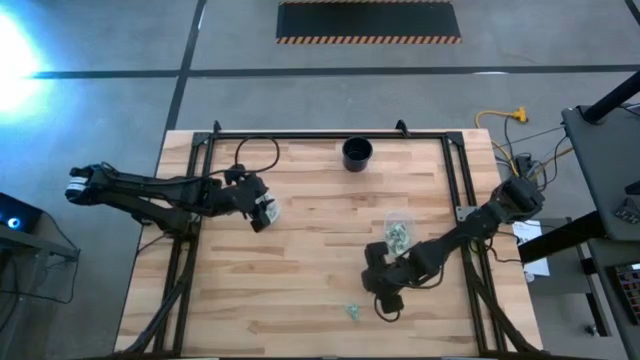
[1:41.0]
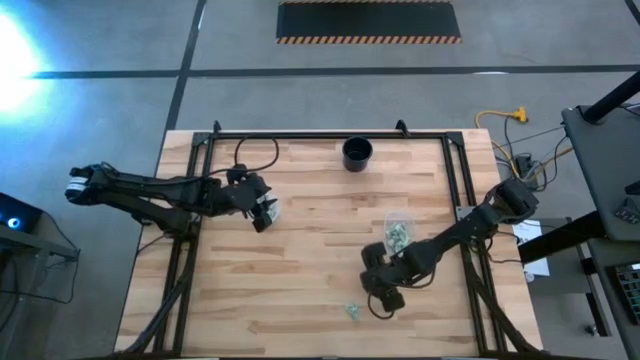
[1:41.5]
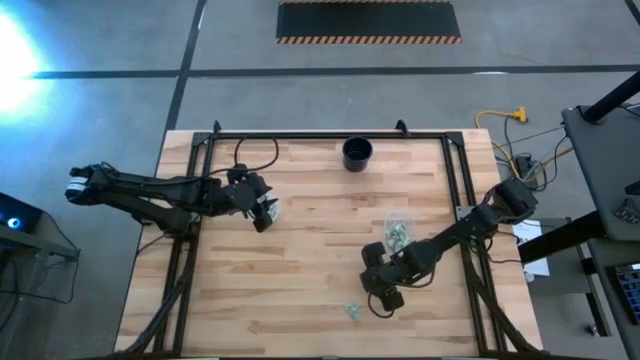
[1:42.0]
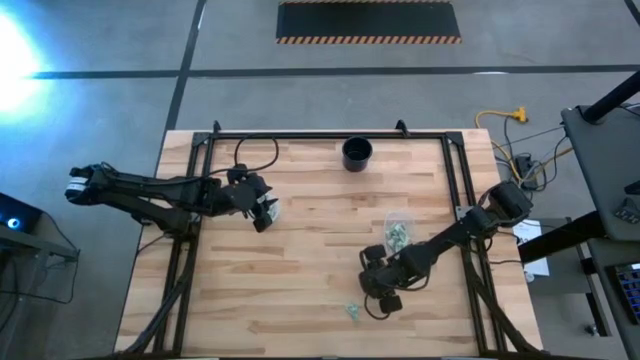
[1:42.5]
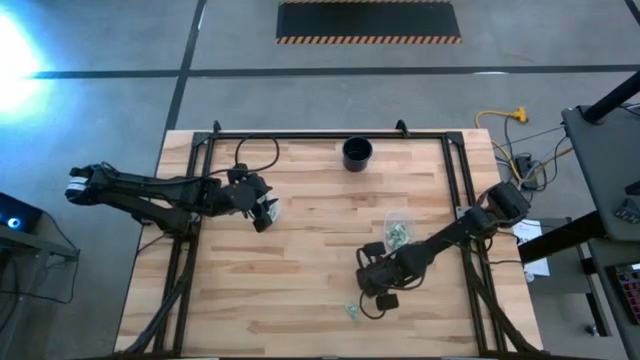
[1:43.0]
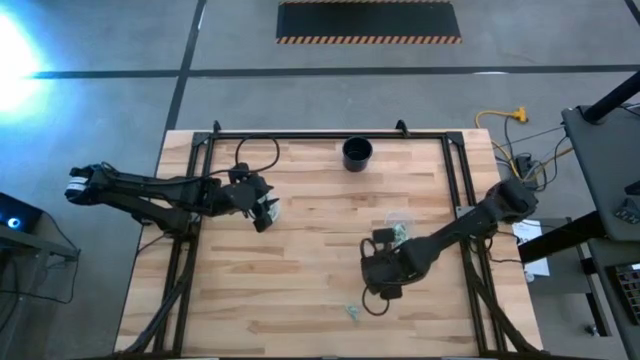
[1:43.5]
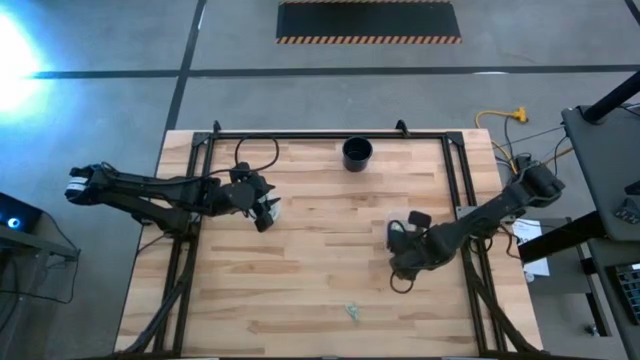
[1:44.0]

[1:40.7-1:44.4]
Task: Pick and place items into bin
Put the white sweetener packet into the right transparent bin

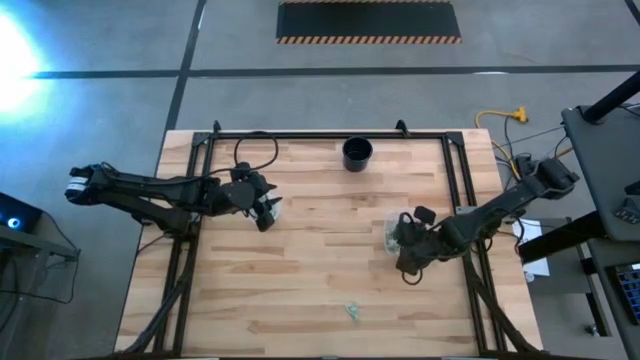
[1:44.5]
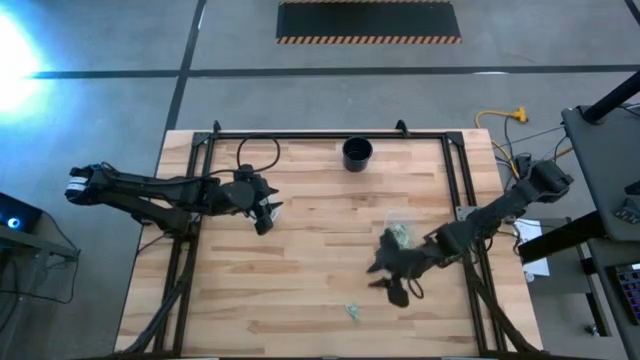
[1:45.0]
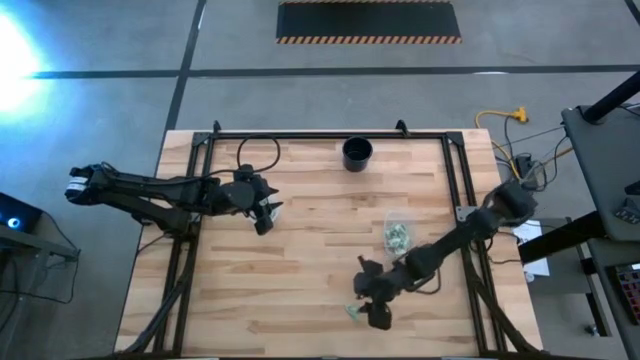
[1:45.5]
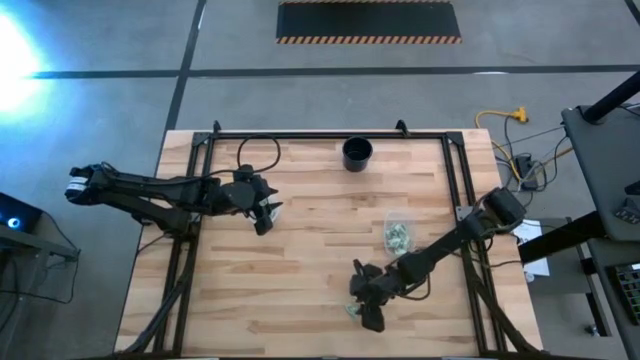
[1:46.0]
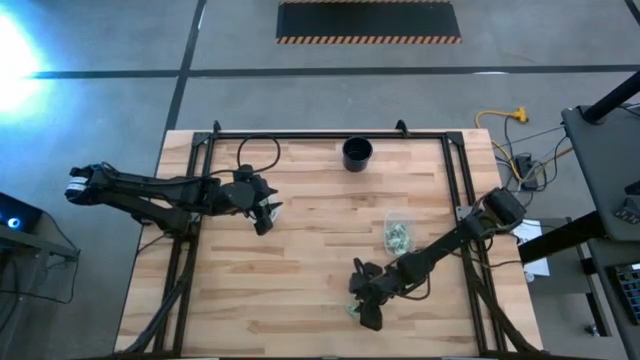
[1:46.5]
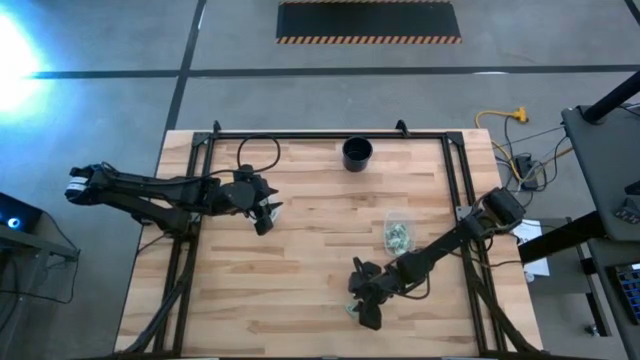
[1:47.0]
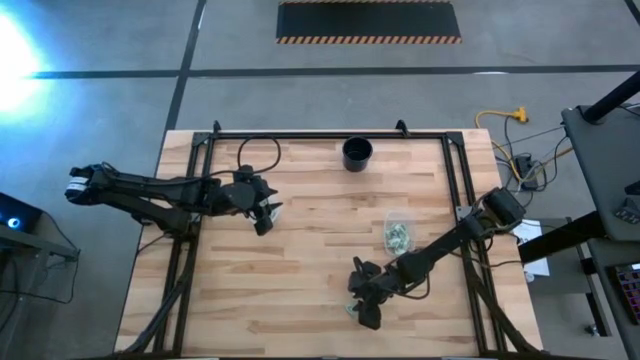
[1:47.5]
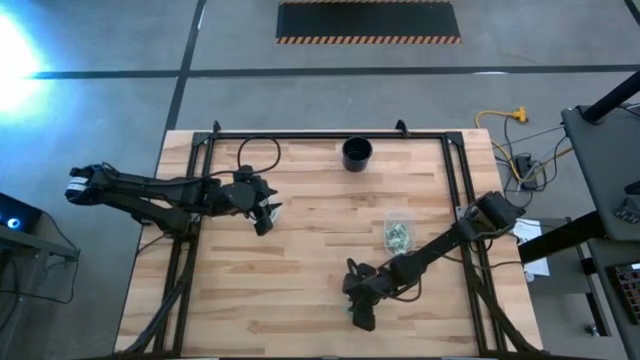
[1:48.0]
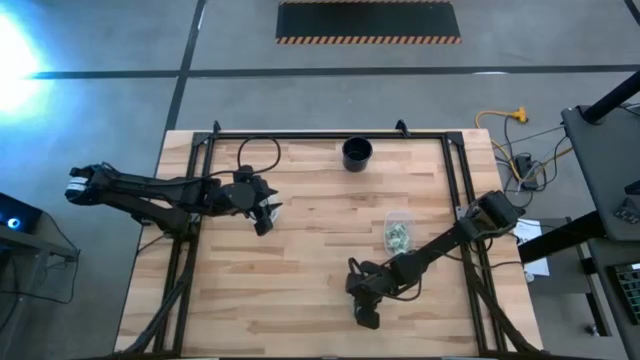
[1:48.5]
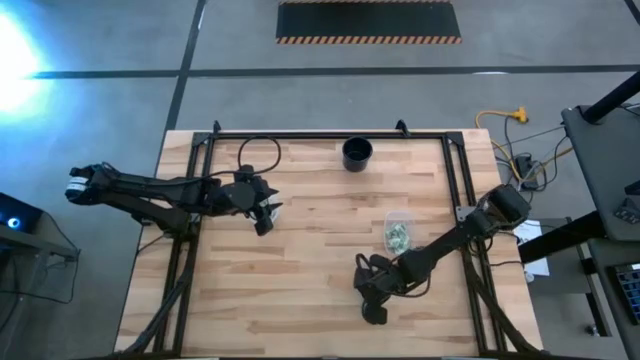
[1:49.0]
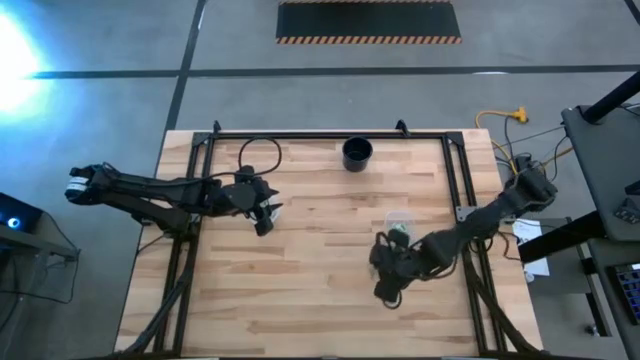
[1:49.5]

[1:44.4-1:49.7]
Put the white sweetener packet into the right transparent bin

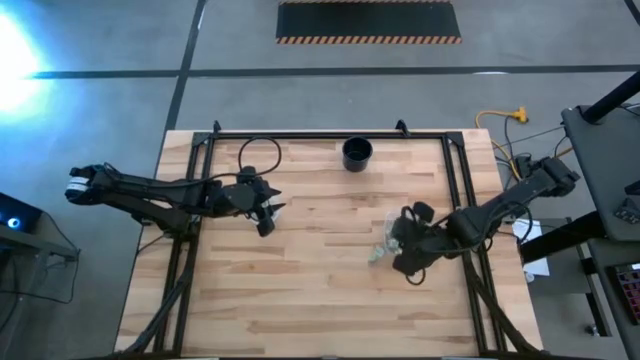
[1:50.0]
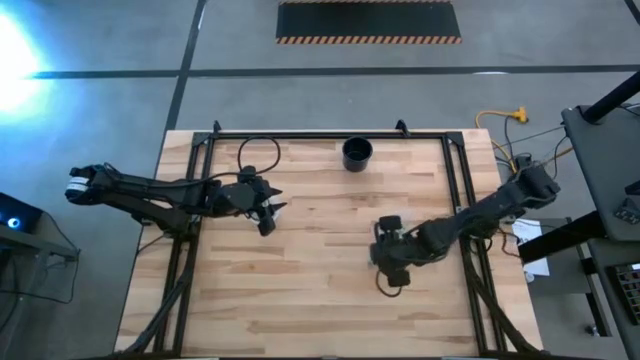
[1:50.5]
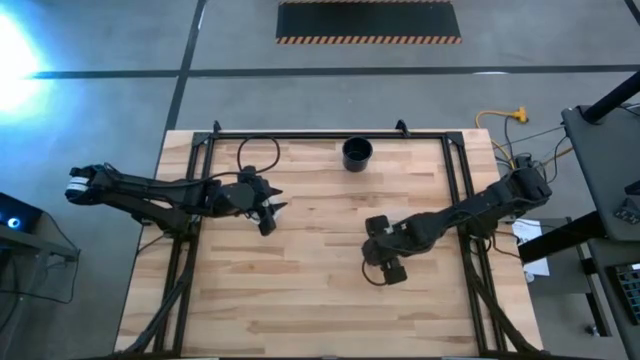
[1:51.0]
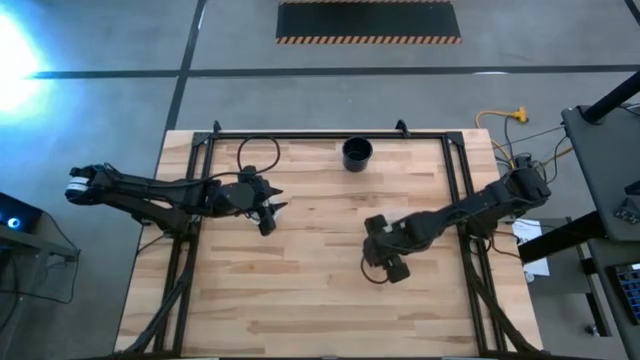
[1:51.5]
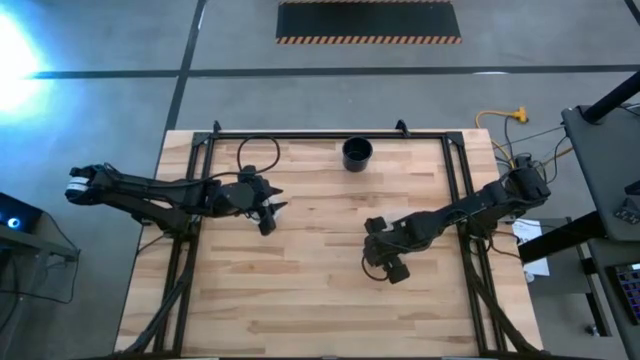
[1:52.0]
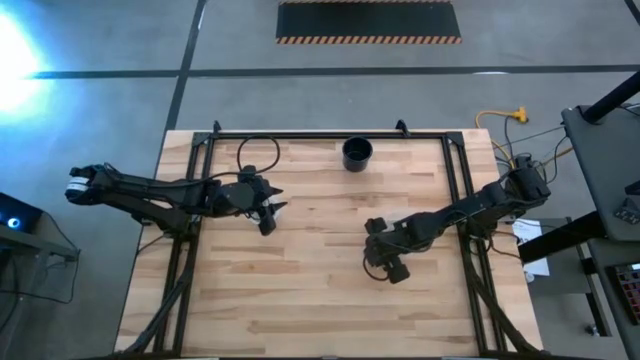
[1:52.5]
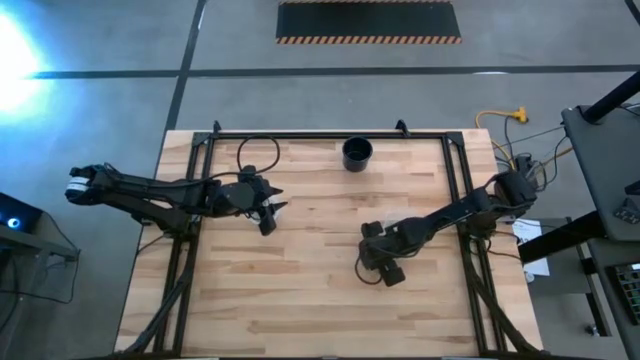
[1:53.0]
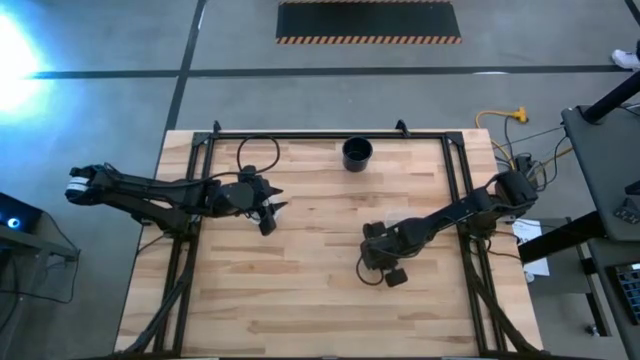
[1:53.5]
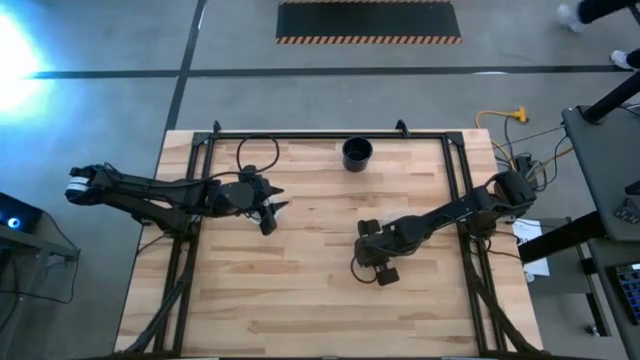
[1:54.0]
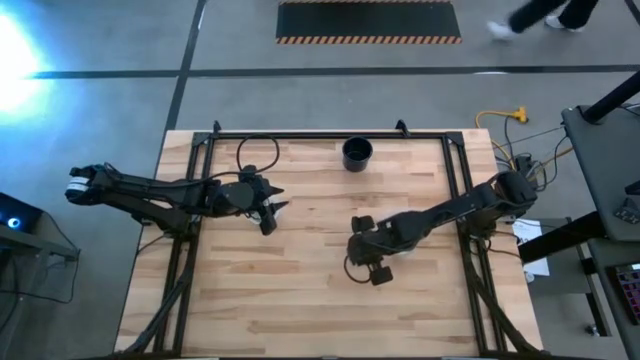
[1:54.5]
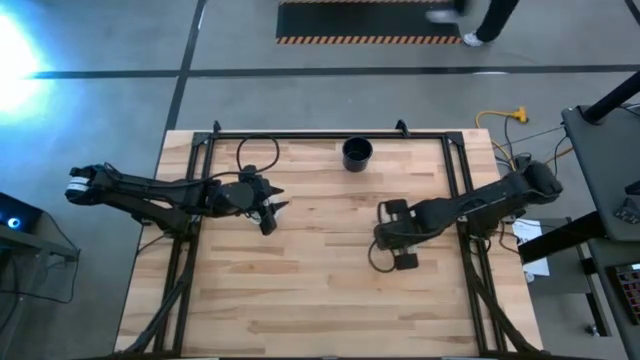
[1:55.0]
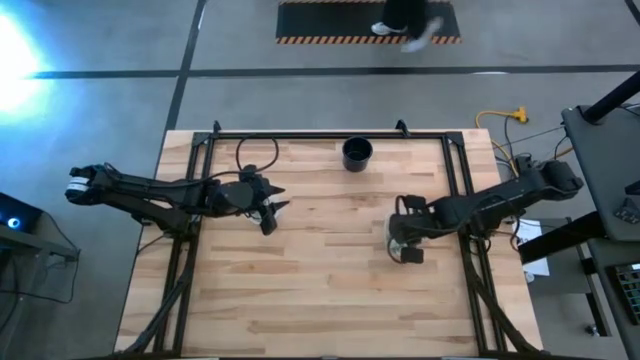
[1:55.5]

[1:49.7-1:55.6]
Put the white sweetener packet into the right transparent bin

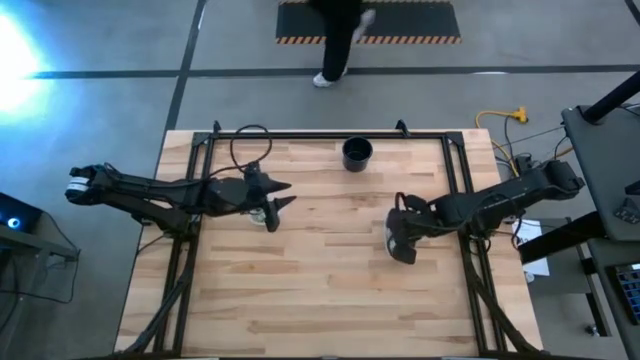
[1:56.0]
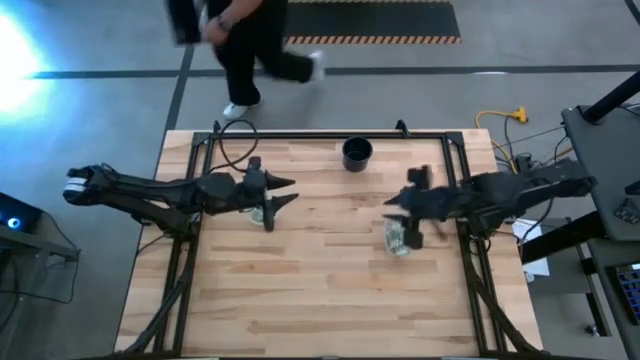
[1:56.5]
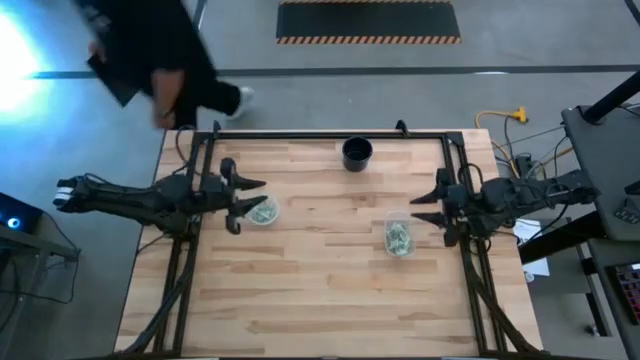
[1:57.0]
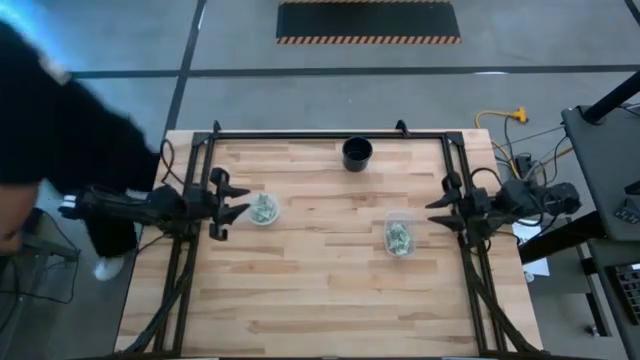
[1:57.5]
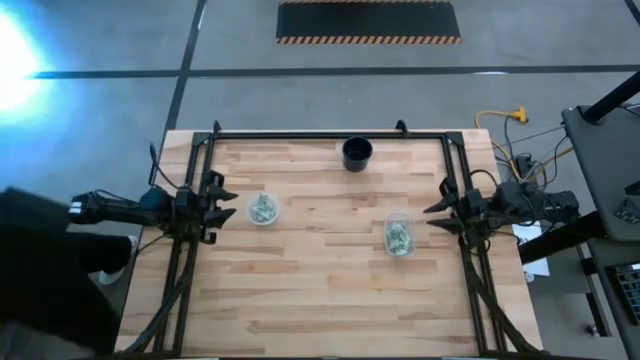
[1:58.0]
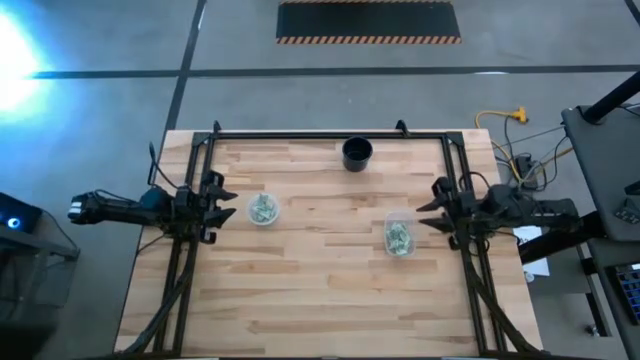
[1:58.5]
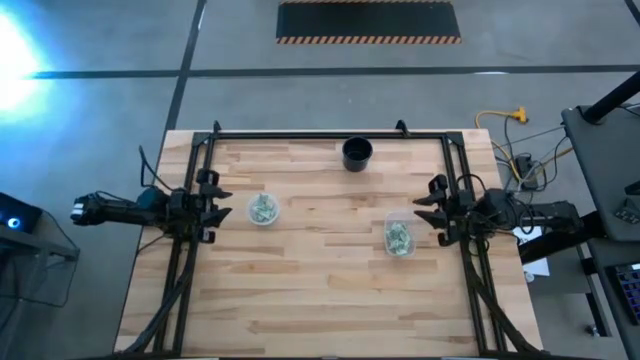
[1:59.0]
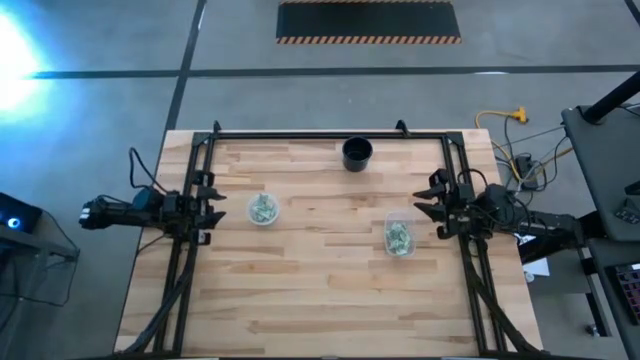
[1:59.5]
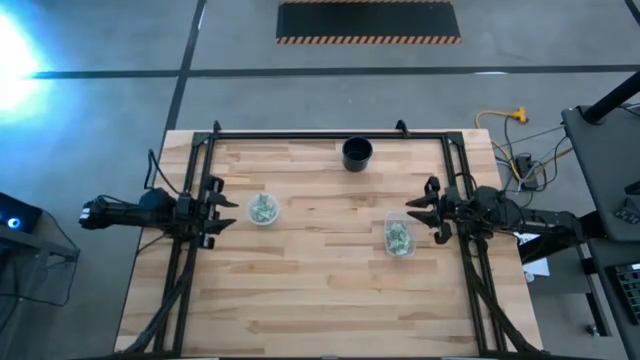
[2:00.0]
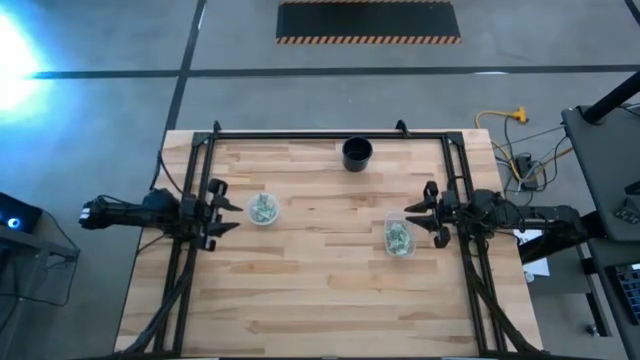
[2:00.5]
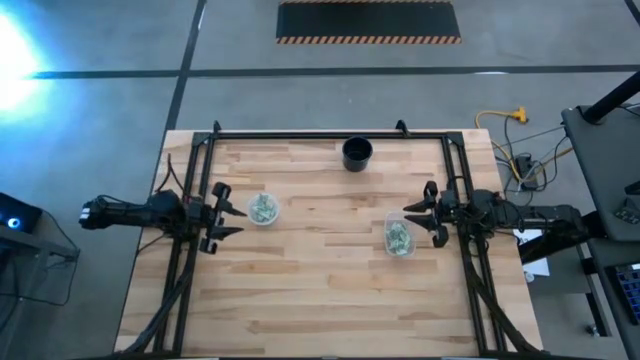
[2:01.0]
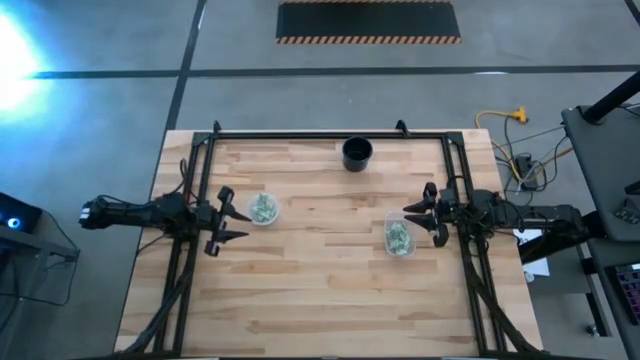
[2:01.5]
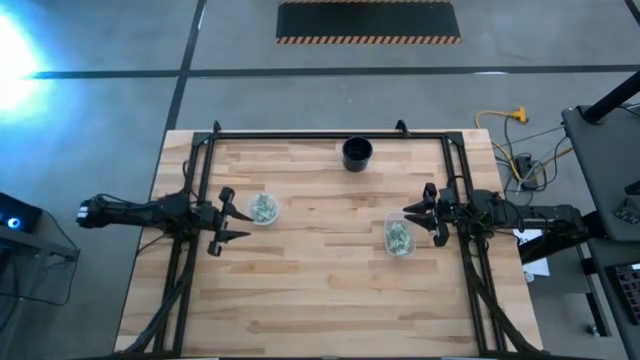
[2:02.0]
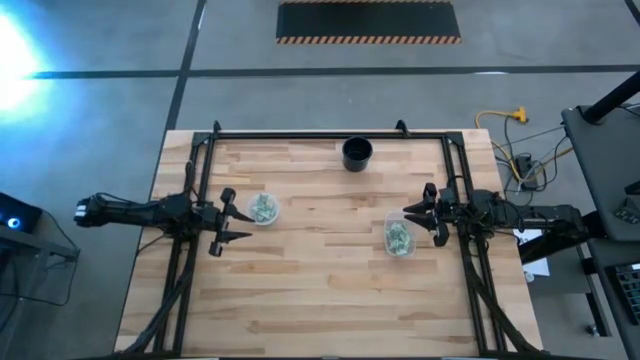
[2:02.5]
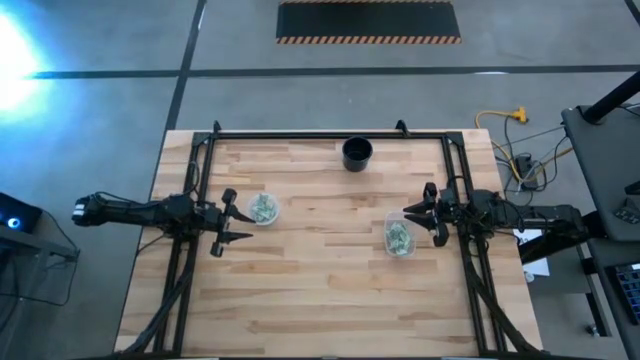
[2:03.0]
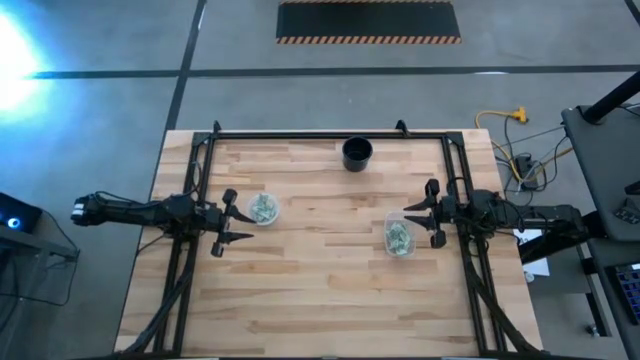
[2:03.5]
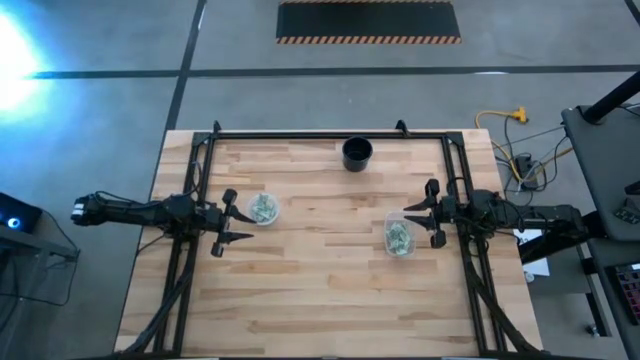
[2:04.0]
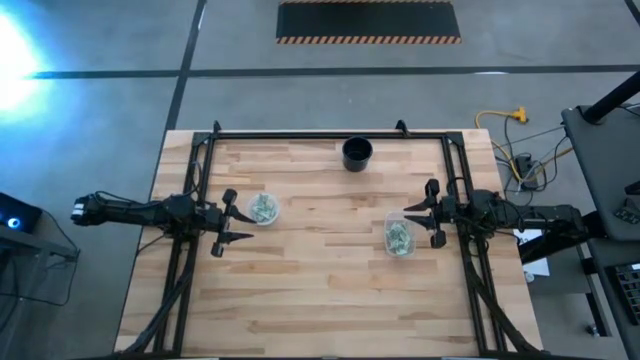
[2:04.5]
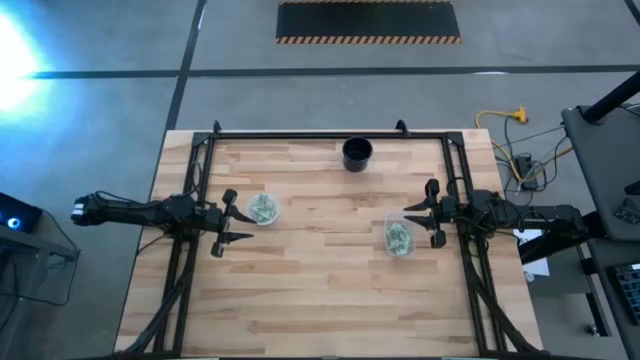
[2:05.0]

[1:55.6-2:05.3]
Return to Home Position
